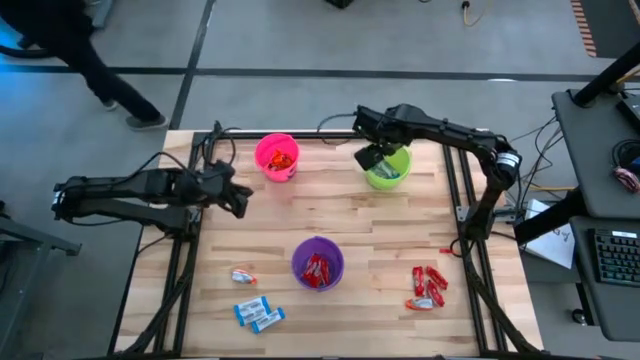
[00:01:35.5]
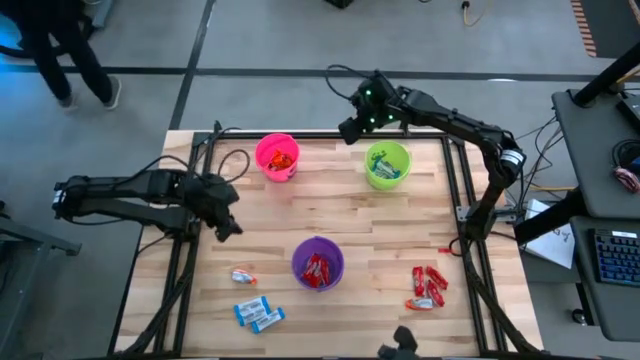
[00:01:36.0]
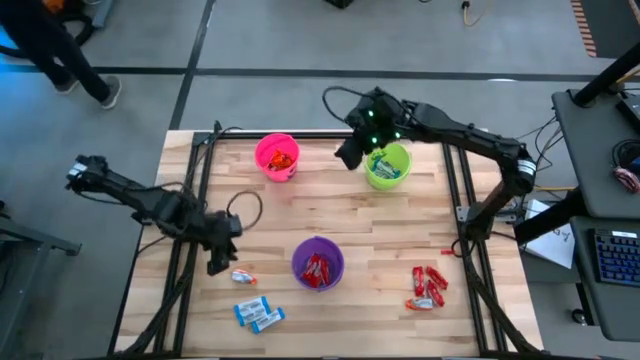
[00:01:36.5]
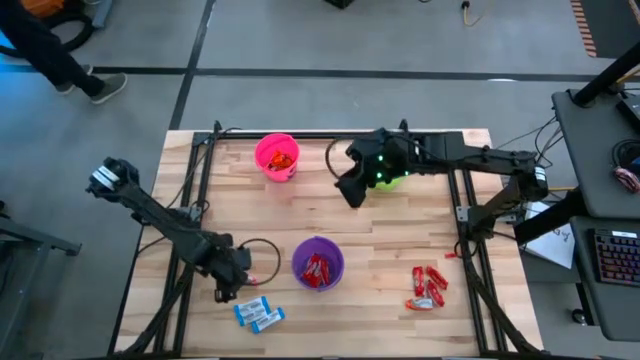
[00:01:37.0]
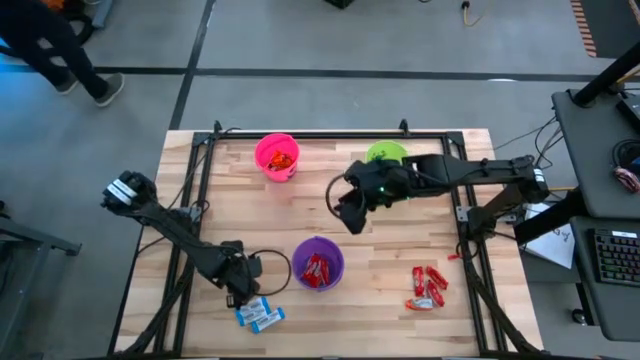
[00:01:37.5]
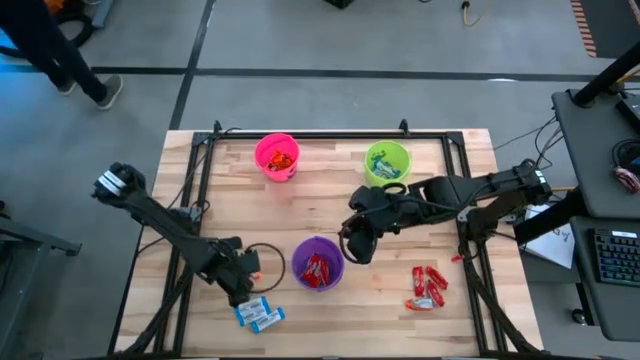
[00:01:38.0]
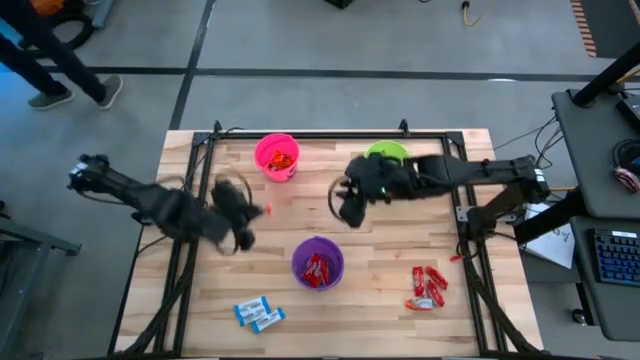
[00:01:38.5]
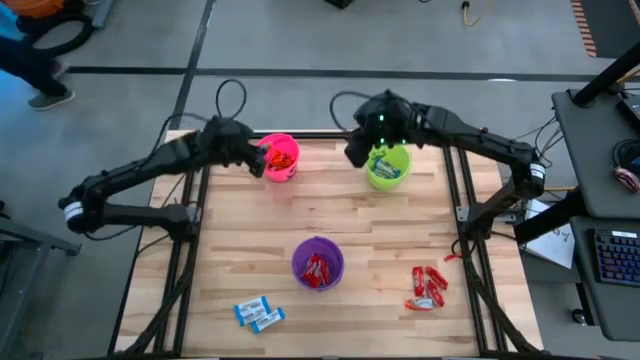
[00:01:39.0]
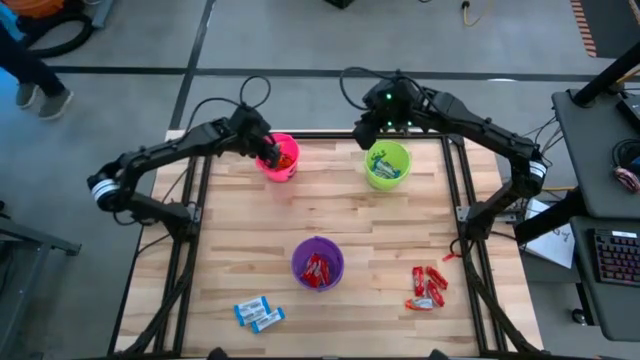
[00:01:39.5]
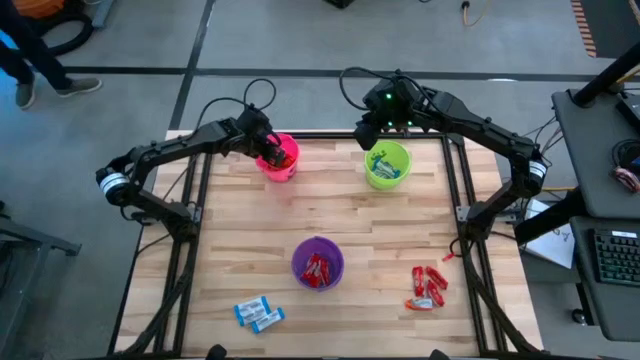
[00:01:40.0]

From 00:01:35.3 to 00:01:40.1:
Task: Sort candy
Put the orange chocolate into the pink bucket

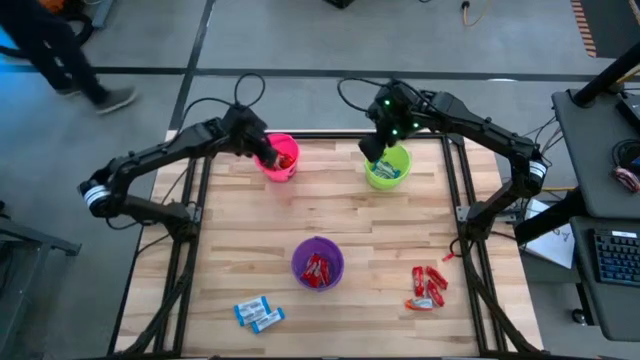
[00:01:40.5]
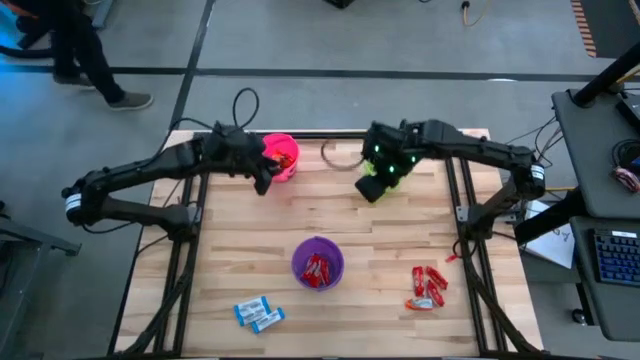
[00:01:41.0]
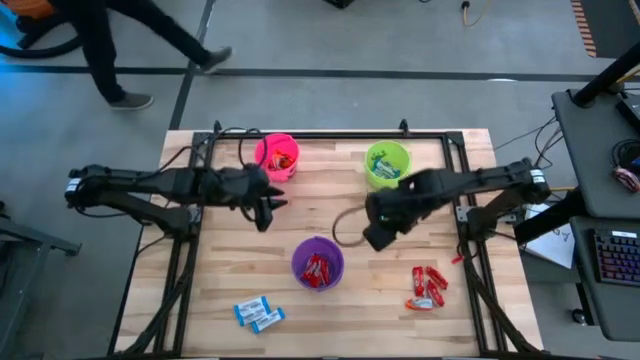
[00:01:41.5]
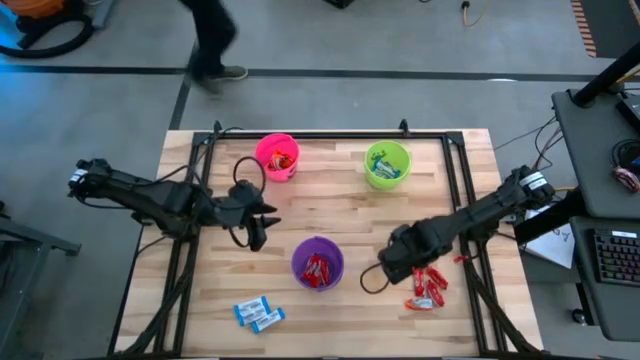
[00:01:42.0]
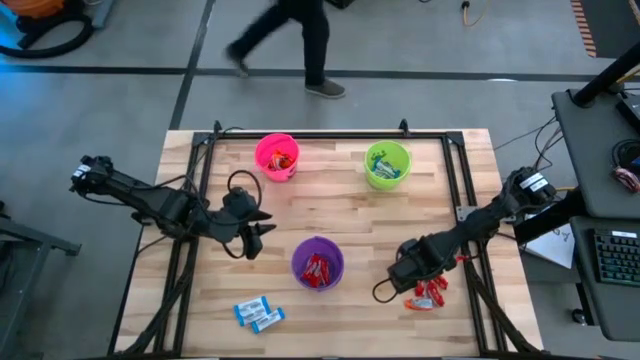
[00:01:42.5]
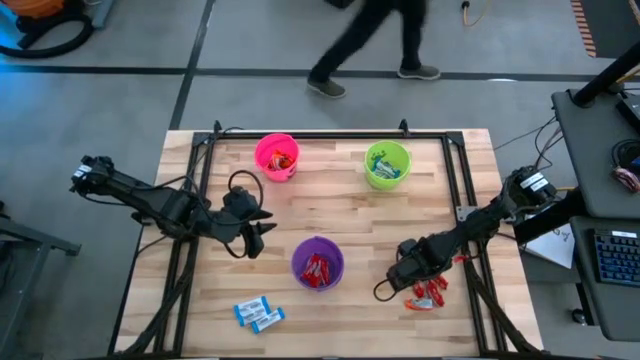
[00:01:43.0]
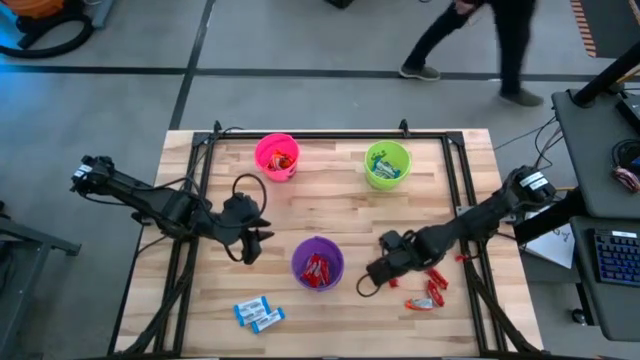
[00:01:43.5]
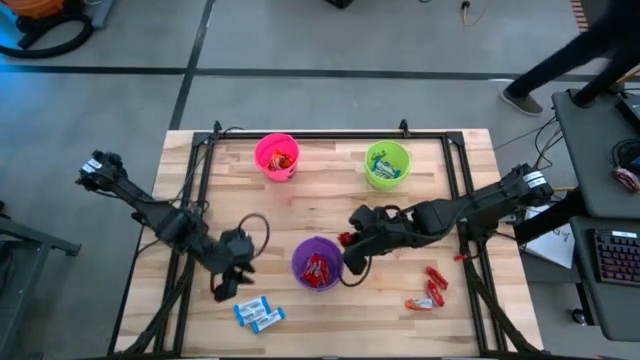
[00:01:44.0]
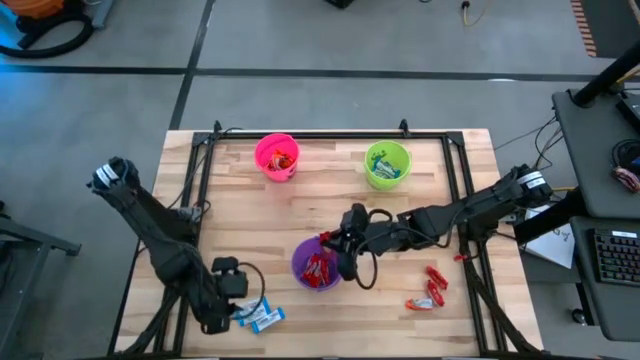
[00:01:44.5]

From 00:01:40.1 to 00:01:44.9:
Put the red chocolate into the violet bucket

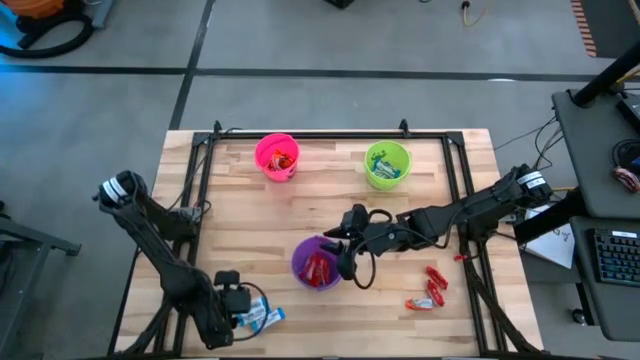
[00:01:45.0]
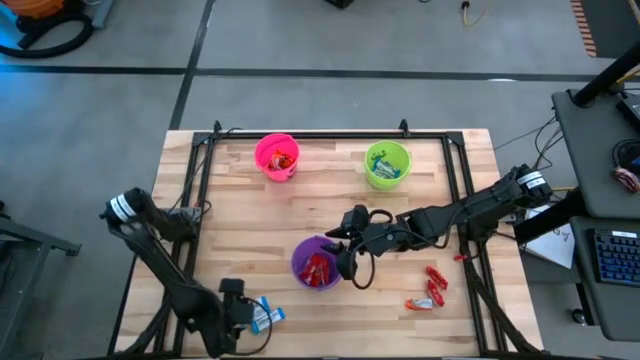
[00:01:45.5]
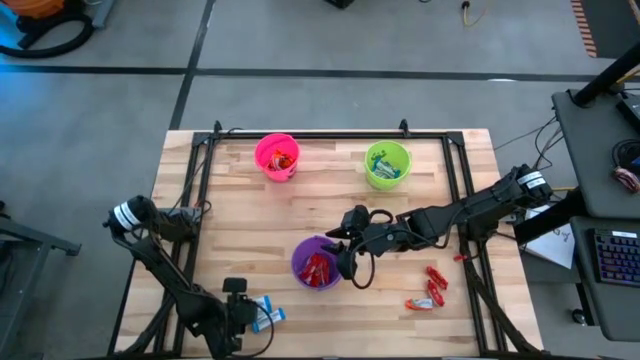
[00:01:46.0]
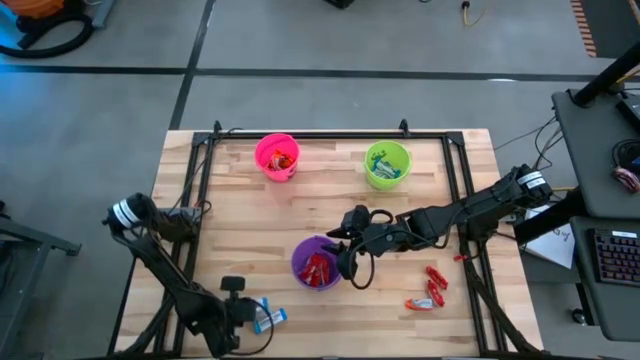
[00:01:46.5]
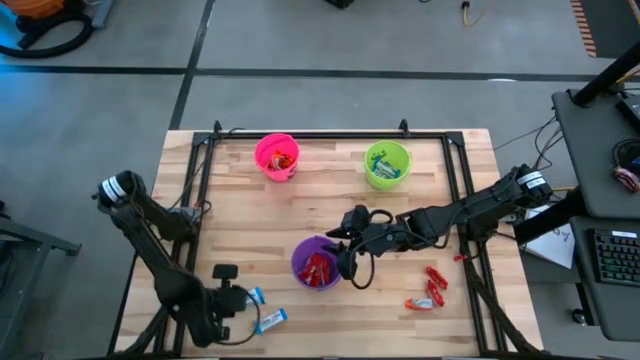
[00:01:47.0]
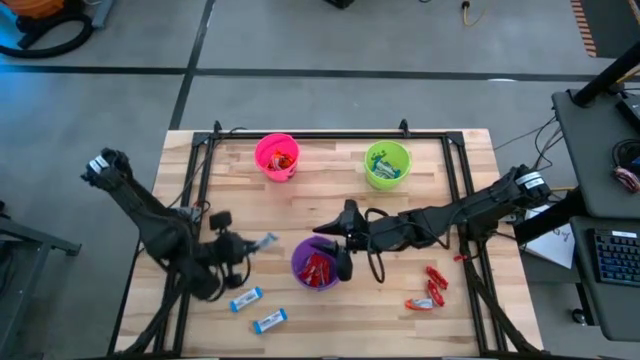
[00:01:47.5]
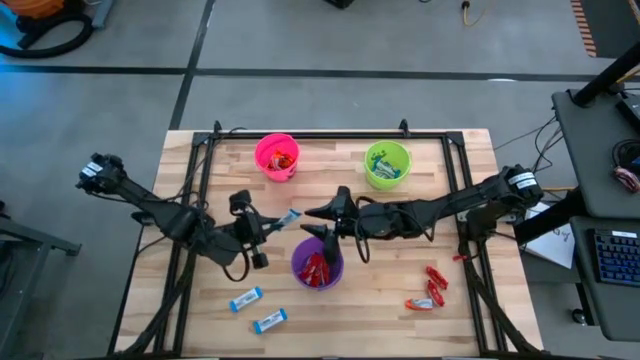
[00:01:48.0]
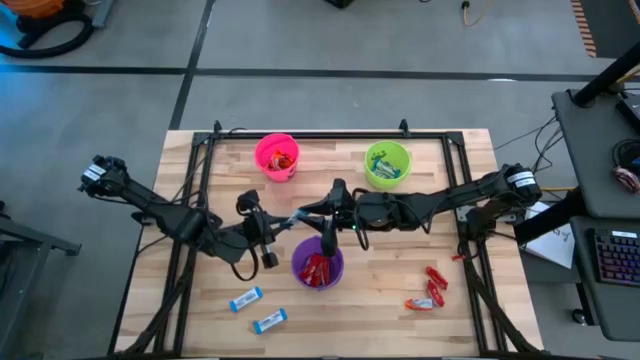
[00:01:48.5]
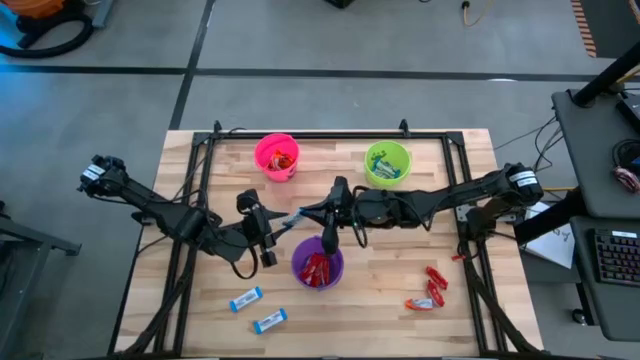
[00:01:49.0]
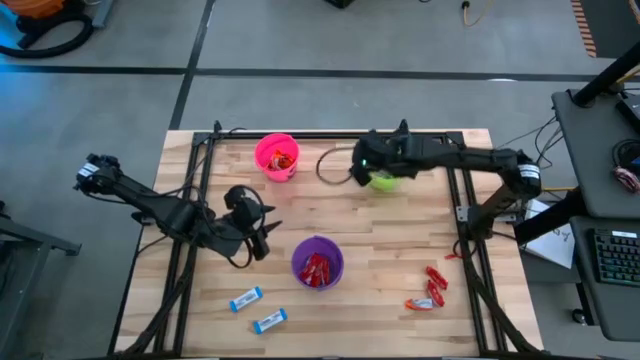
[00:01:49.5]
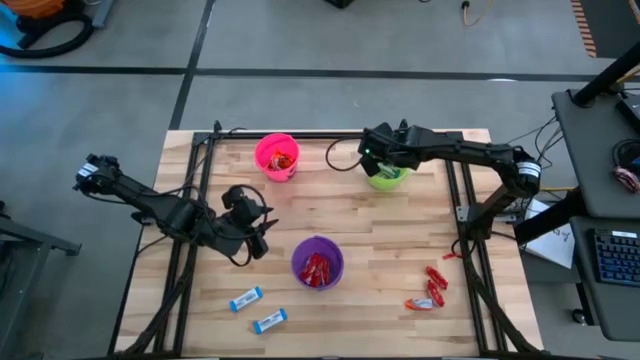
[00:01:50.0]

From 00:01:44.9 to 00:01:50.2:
Put the white-blue chocolate into the green bucket

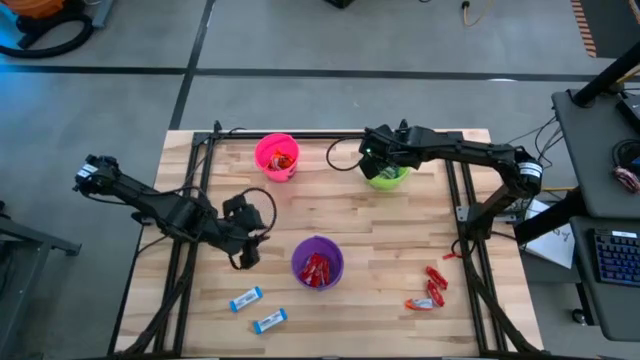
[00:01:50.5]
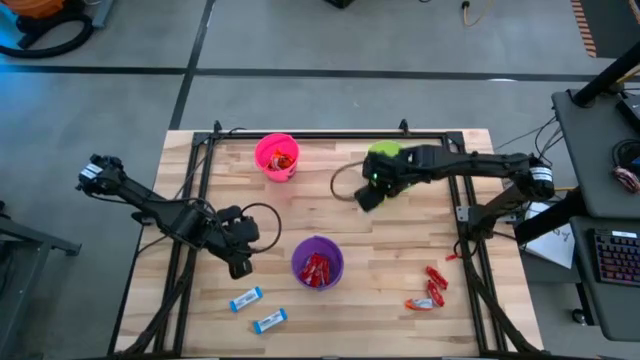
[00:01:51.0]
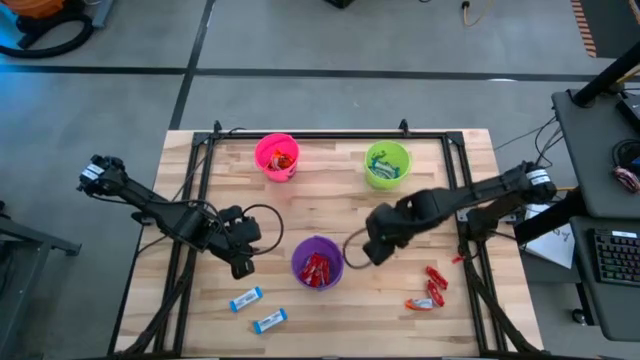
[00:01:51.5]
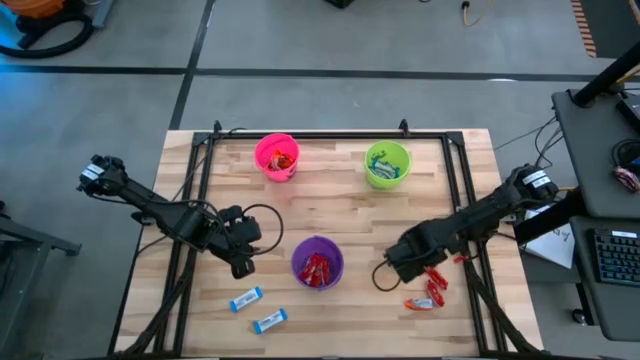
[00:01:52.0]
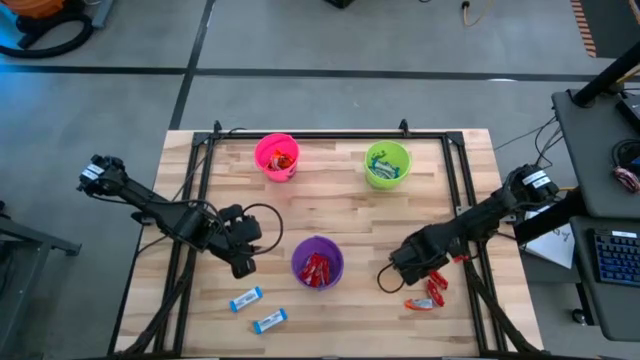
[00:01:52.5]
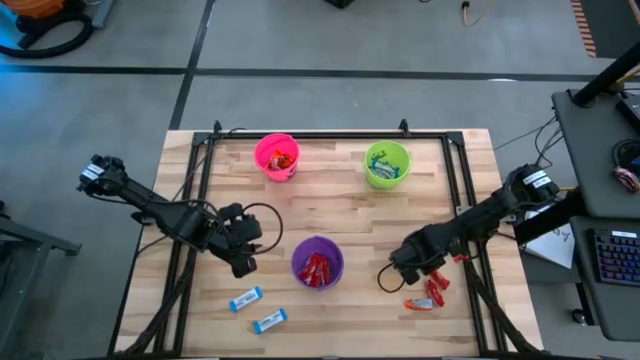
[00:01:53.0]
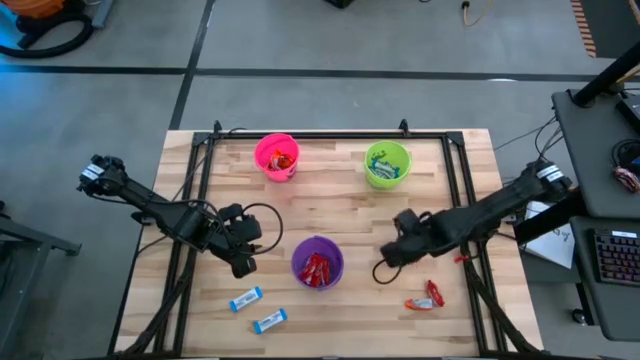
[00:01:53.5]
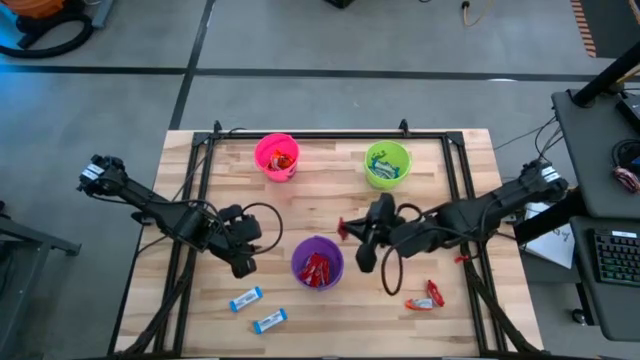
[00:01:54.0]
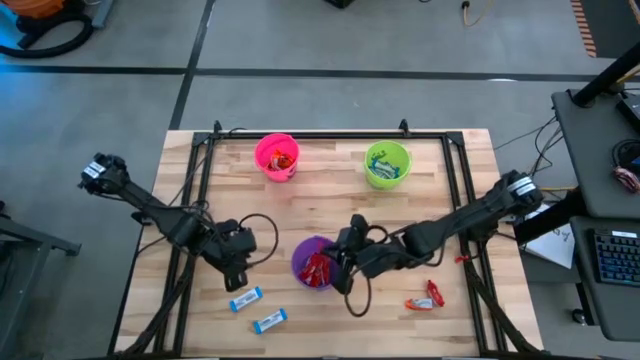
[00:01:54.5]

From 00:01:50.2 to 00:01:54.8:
Put the red chocolate into the violet bucket

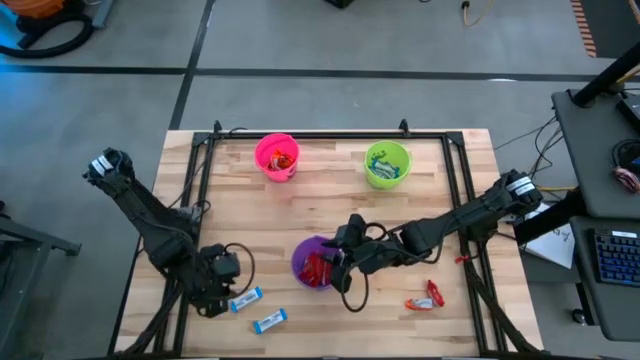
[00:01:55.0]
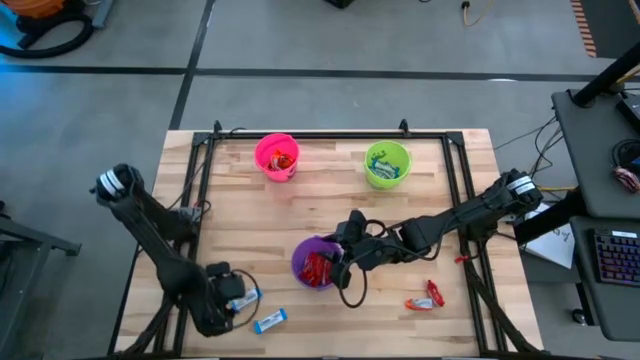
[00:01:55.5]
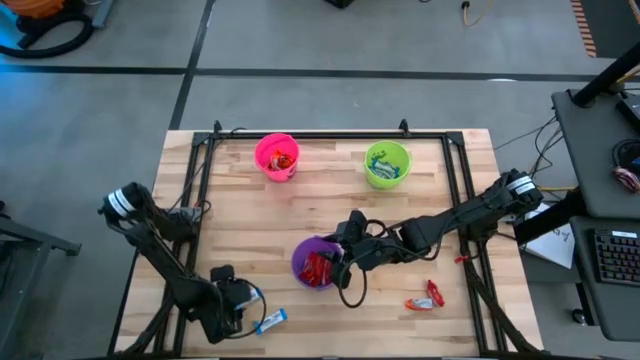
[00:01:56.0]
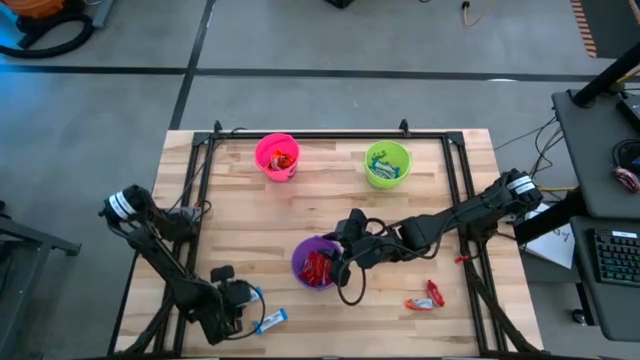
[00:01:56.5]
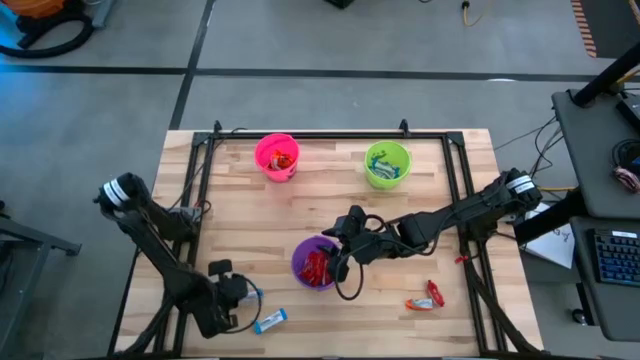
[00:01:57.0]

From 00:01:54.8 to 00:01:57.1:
Put the white-blue chocolate into the green bucket
